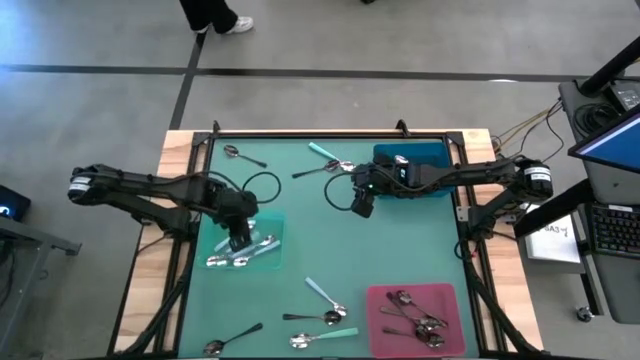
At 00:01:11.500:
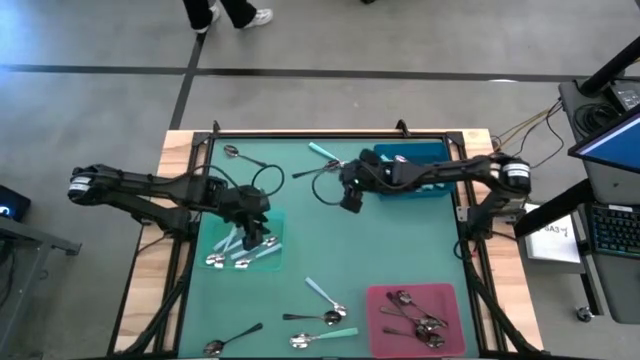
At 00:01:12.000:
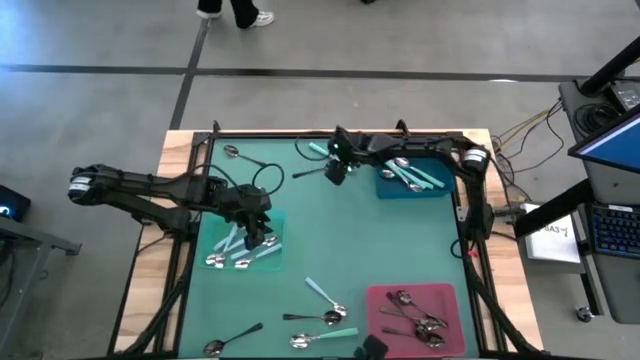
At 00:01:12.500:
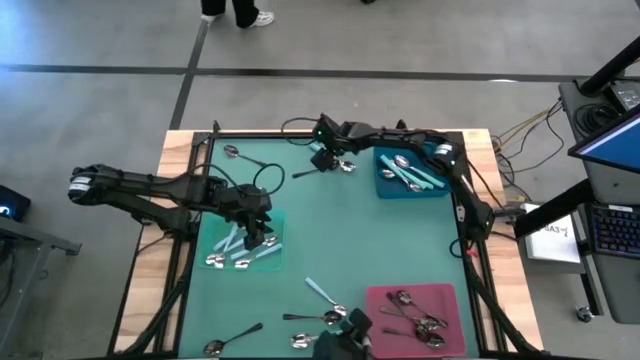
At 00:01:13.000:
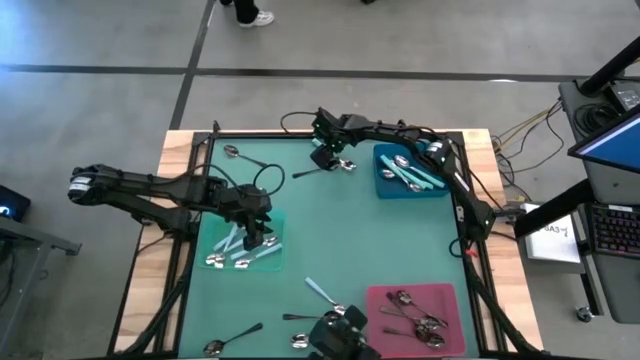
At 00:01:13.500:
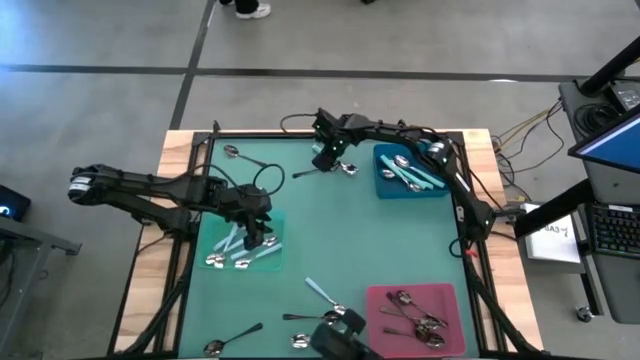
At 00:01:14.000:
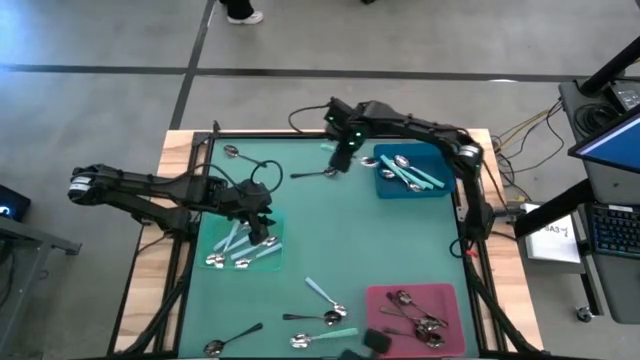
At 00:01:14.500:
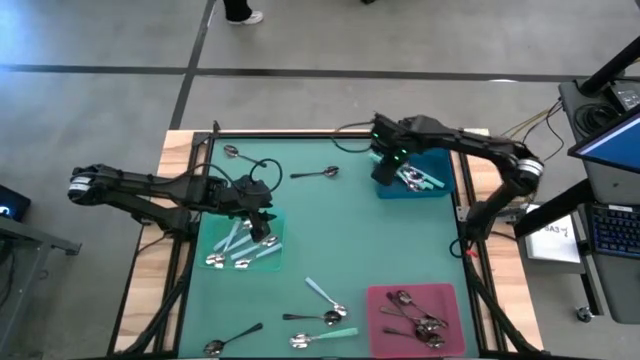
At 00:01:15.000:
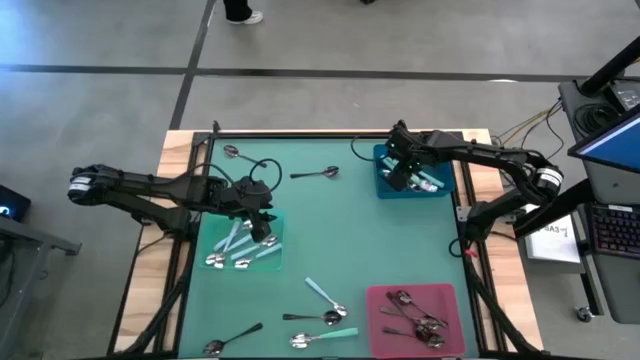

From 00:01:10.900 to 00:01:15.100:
Task: Sort silverware by color (type)
Put the green spoon into the blue bin

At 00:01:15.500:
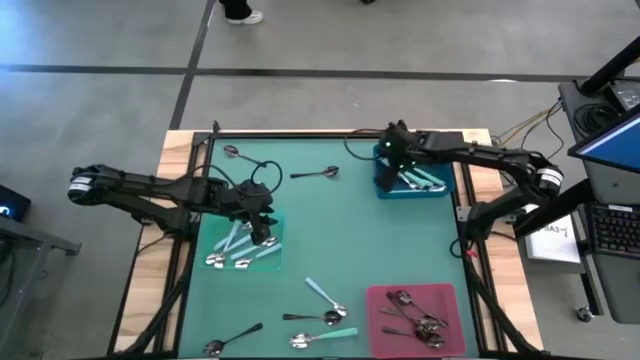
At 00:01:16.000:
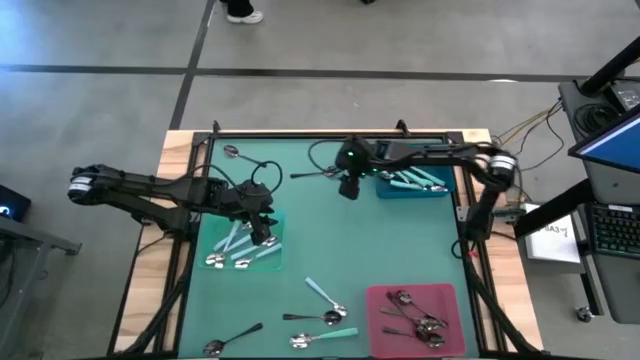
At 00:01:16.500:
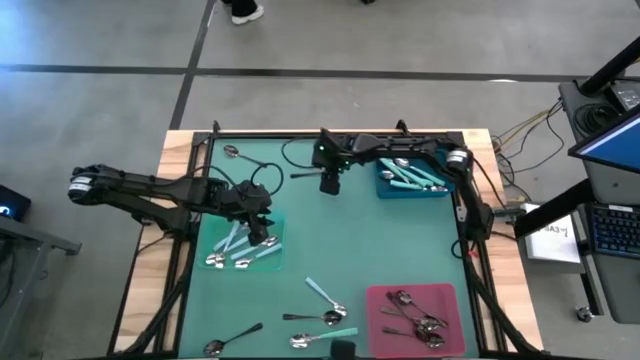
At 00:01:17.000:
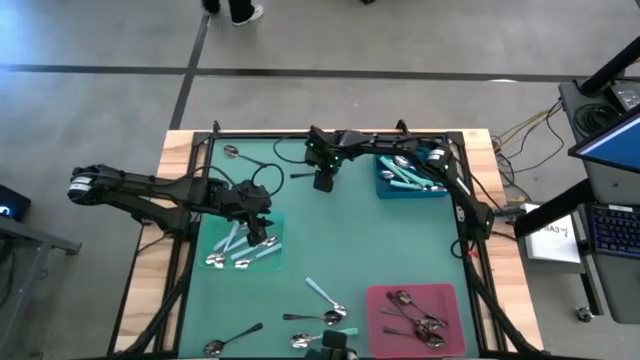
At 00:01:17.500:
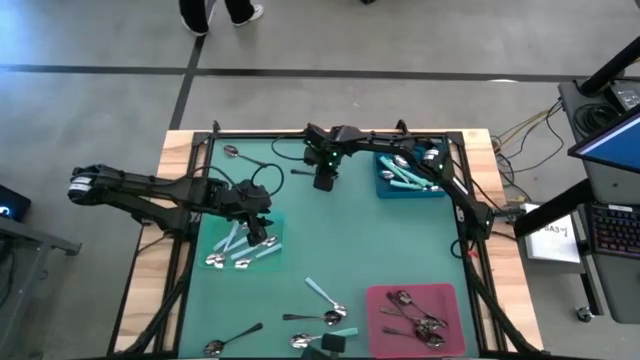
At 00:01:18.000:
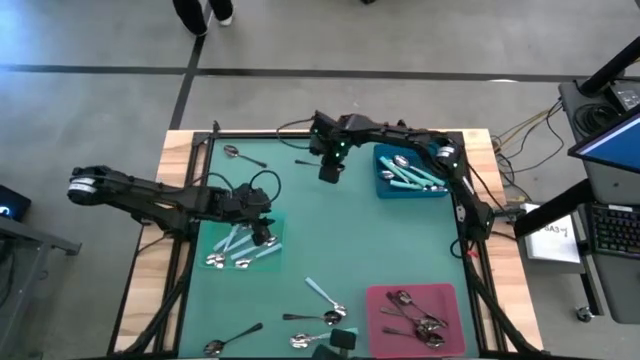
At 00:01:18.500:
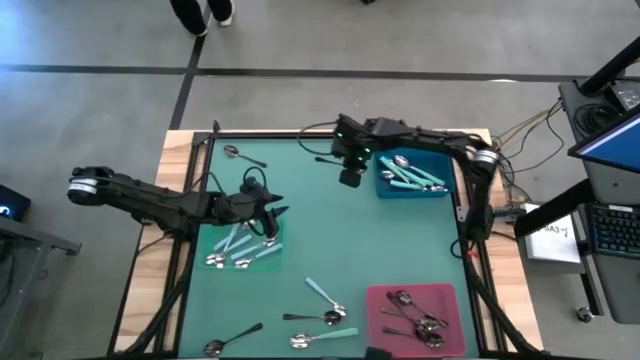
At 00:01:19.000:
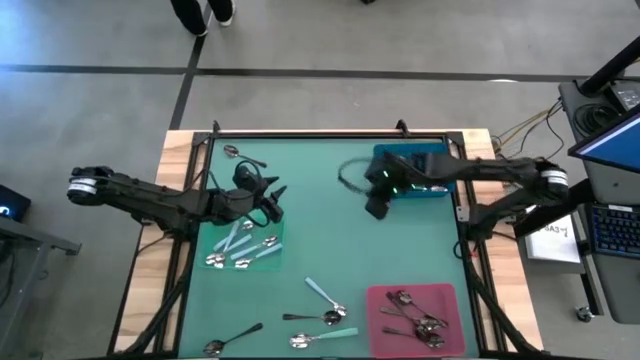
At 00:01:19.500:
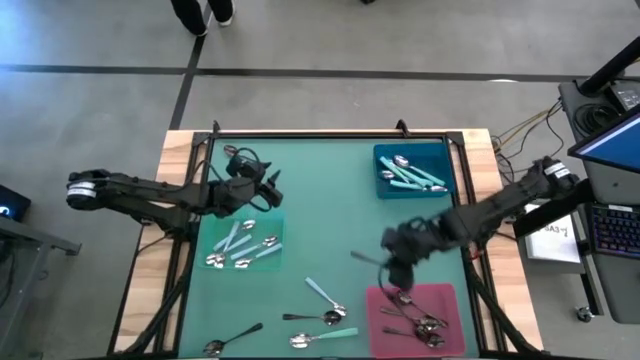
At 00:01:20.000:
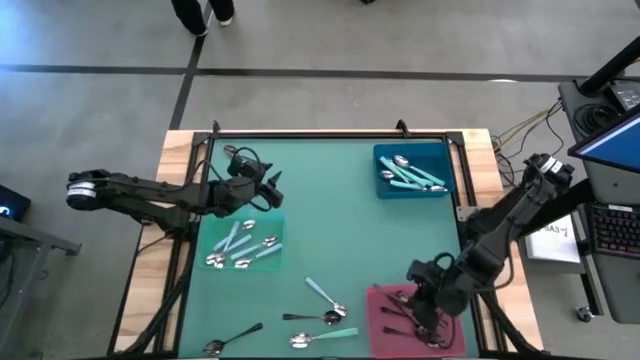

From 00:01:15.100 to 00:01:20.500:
Put the black spoon into the red bin

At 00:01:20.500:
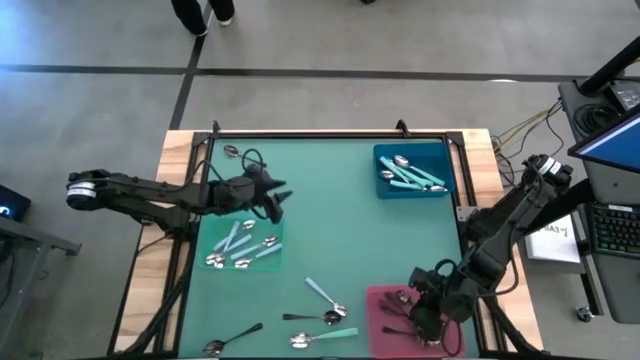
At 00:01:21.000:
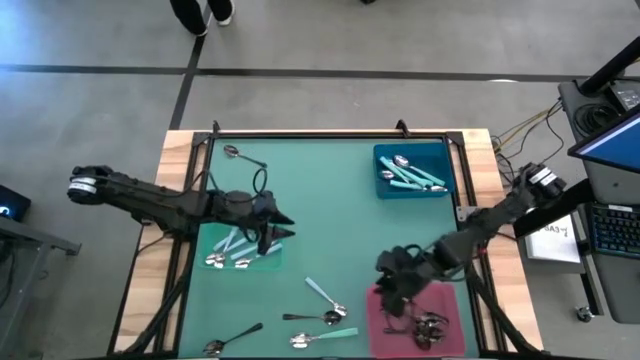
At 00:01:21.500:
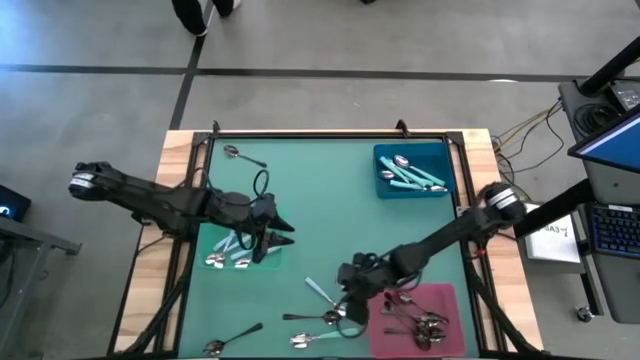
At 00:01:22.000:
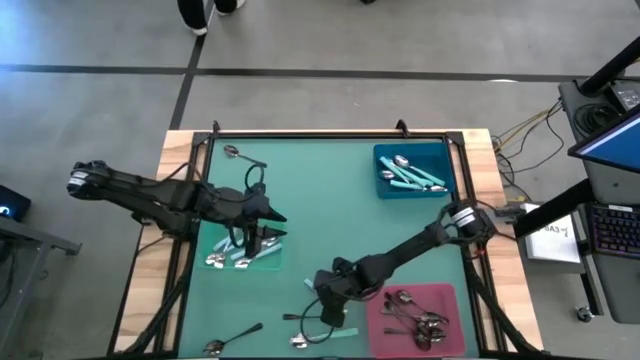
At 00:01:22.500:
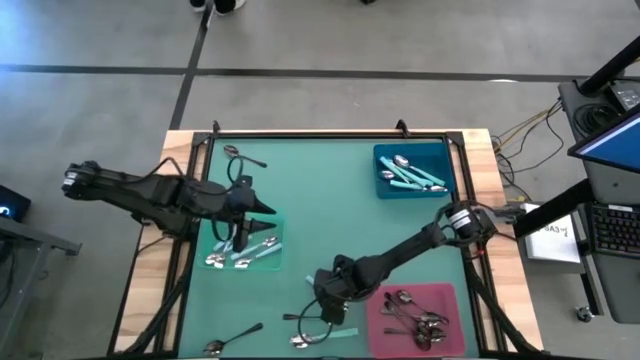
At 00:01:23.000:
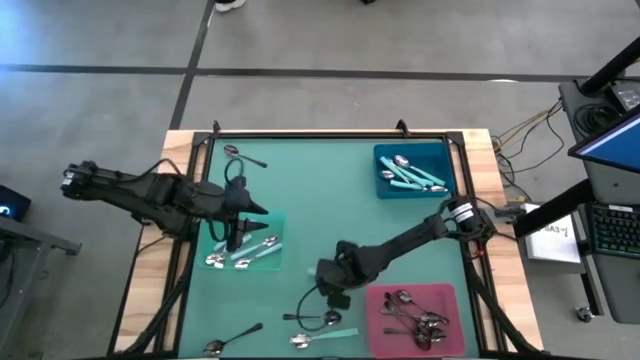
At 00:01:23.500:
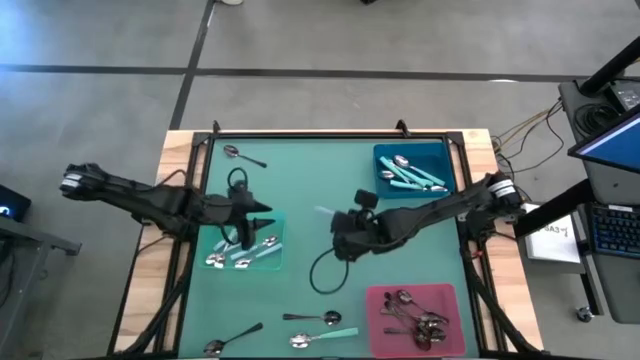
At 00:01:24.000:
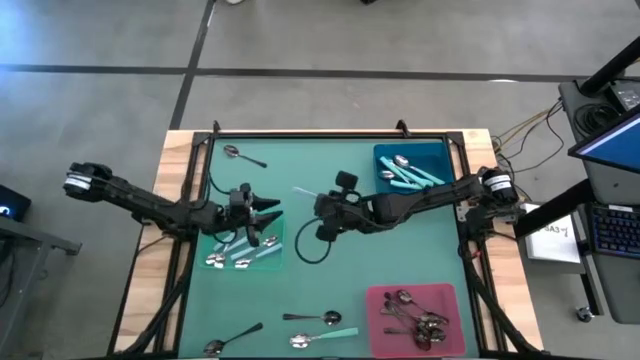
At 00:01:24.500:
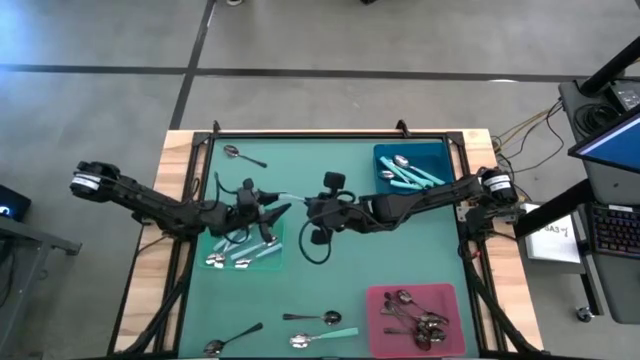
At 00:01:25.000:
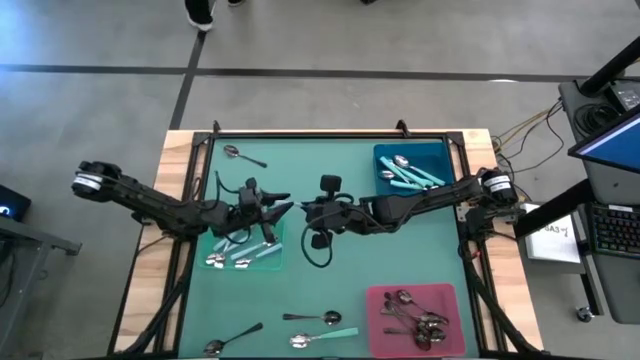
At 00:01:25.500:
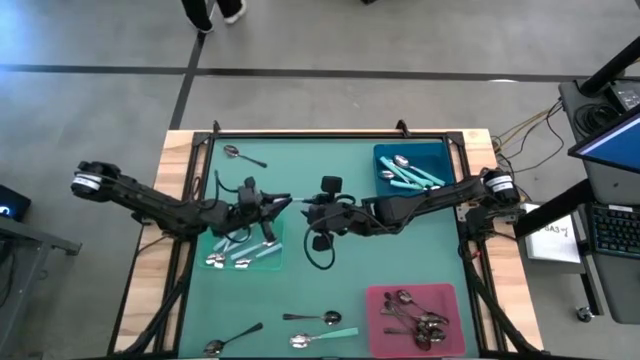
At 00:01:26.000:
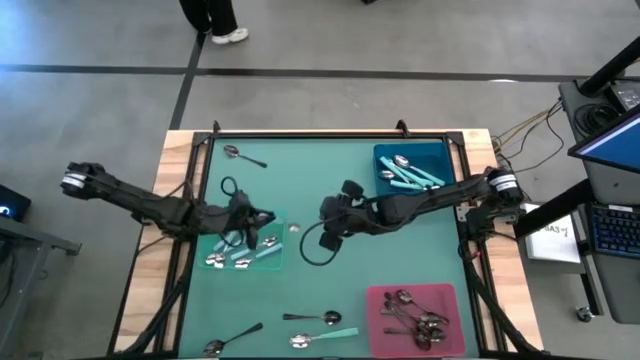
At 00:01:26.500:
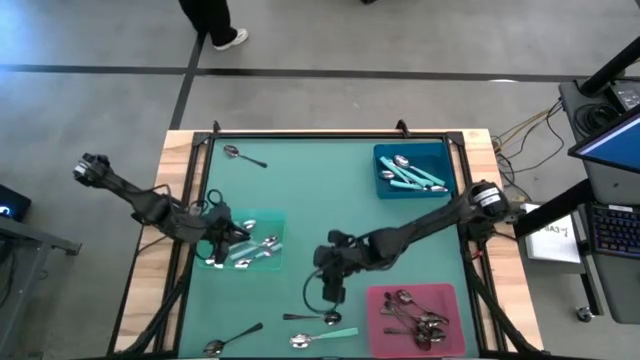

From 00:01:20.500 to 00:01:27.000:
Put the blue spoon into the green bin

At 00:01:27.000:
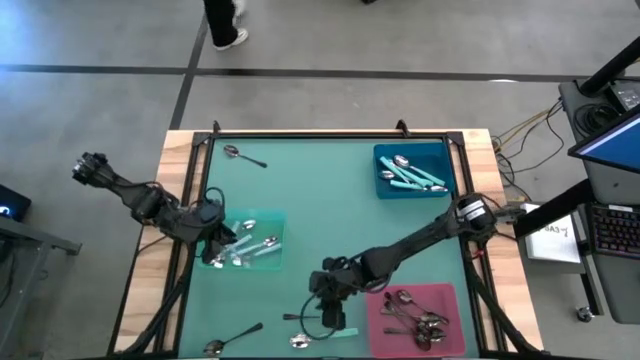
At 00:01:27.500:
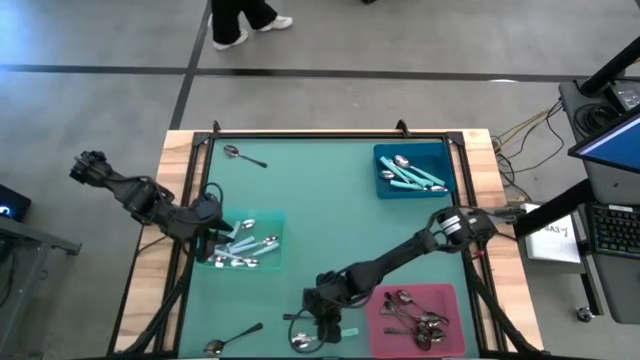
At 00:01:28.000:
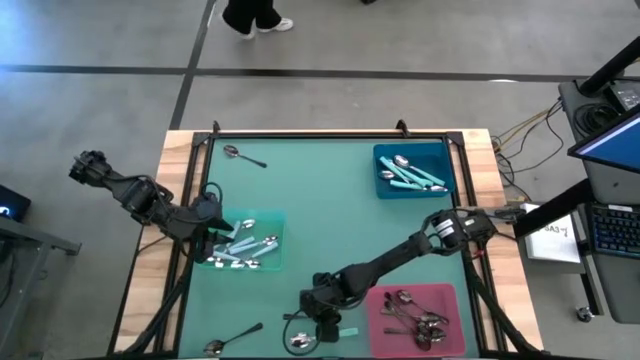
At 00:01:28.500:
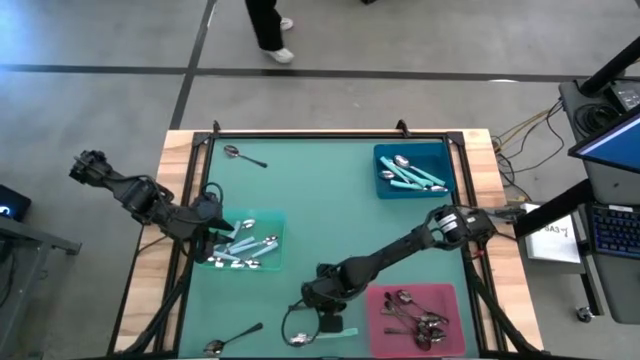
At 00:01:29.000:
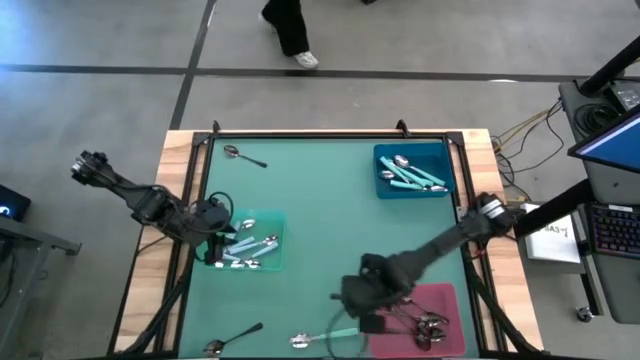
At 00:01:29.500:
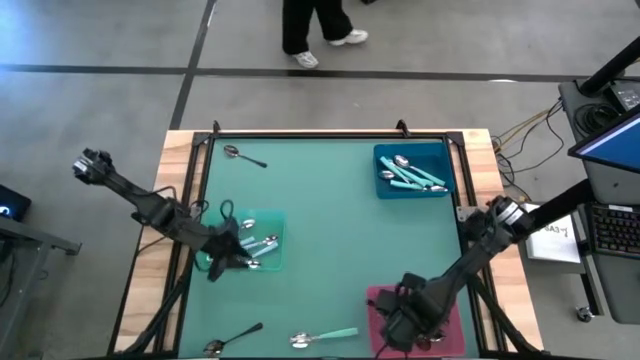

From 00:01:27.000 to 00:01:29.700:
Put the black spoon into the red bin

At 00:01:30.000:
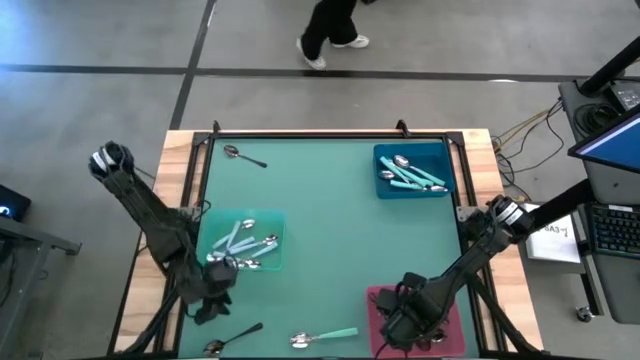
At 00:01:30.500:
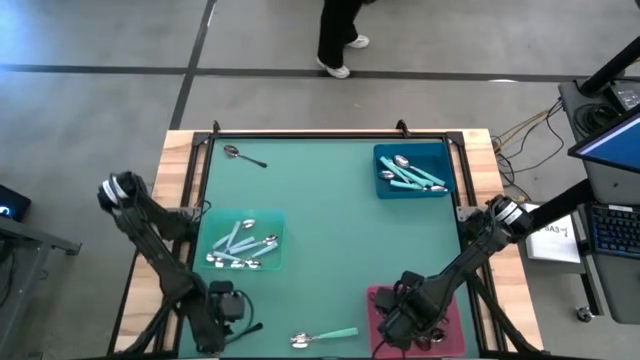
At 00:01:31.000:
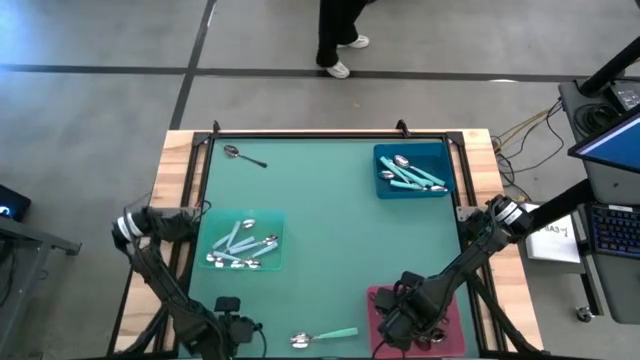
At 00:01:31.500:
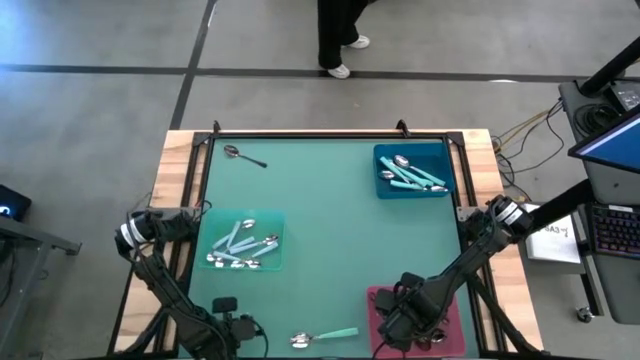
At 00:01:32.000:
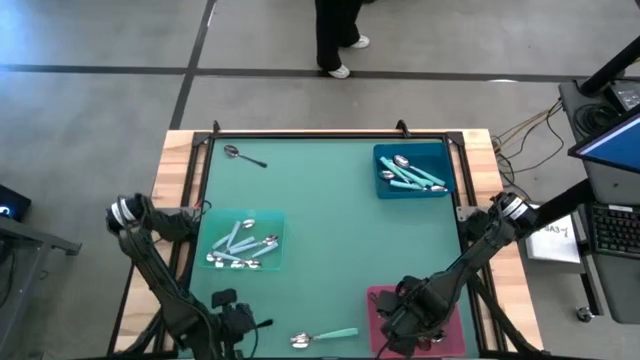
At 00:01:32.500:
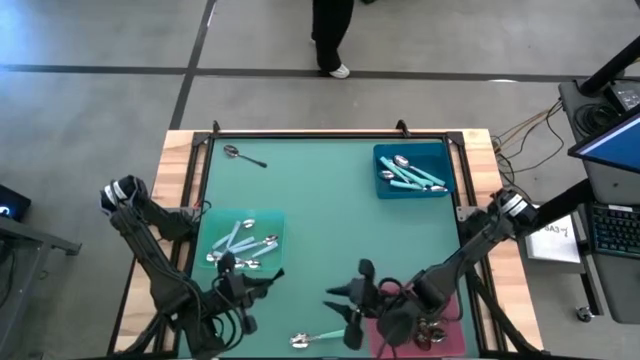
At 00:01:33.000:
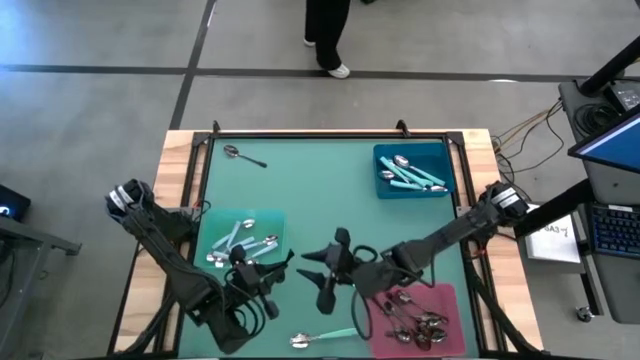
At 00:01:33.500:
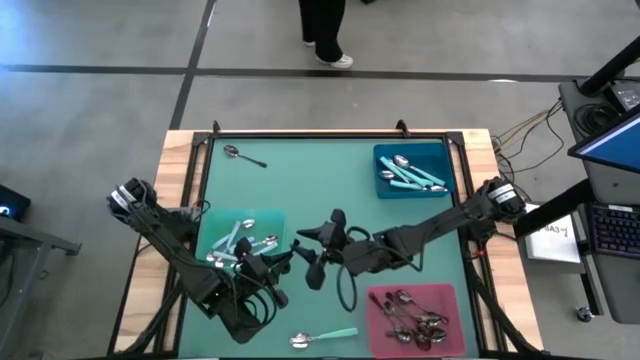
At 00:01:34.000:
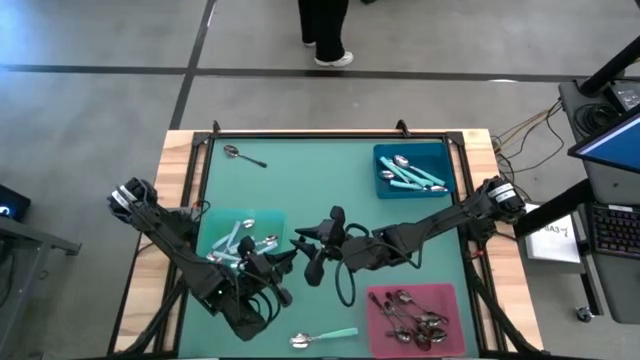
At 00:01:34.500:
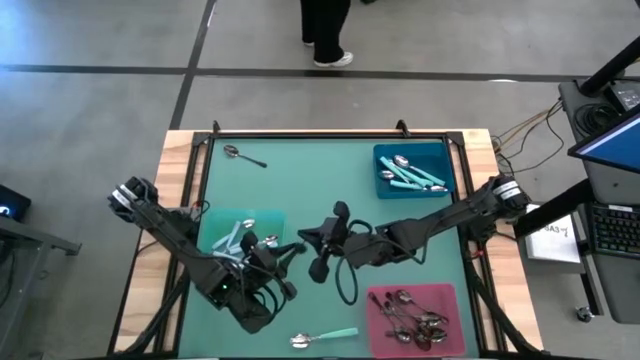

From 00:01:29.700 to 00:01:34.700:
Put the black spoon into the red bin
